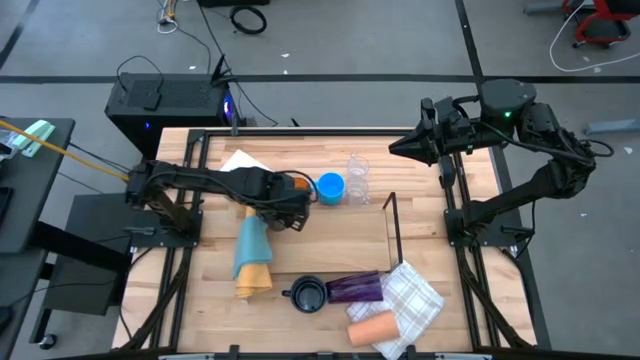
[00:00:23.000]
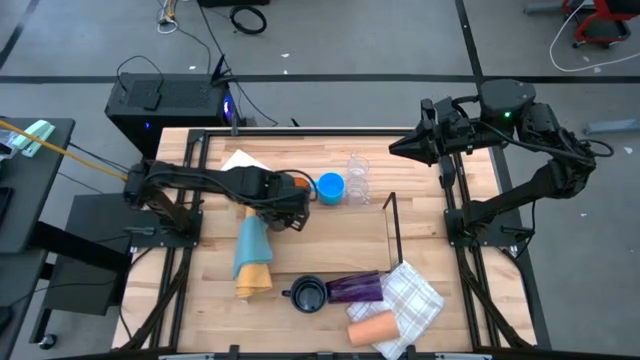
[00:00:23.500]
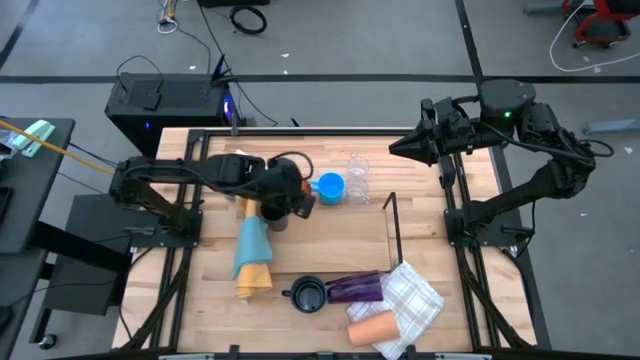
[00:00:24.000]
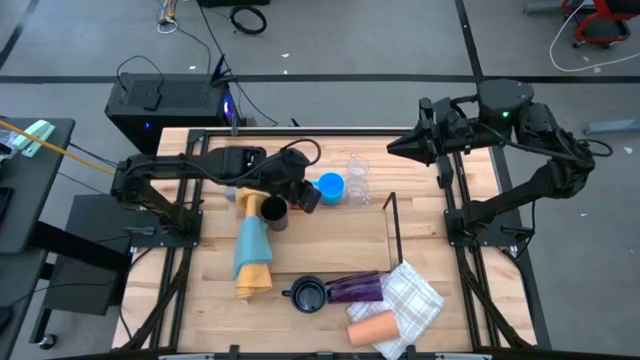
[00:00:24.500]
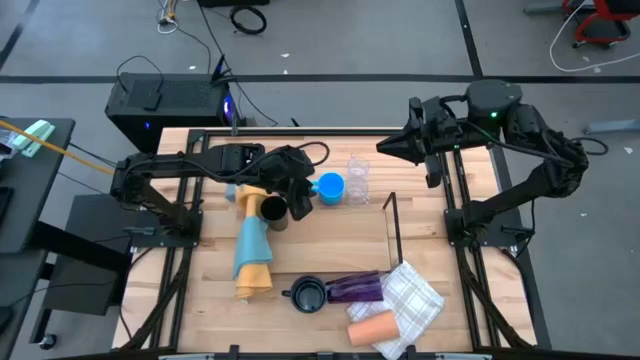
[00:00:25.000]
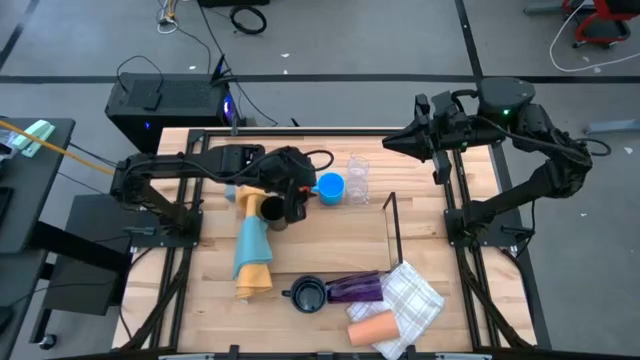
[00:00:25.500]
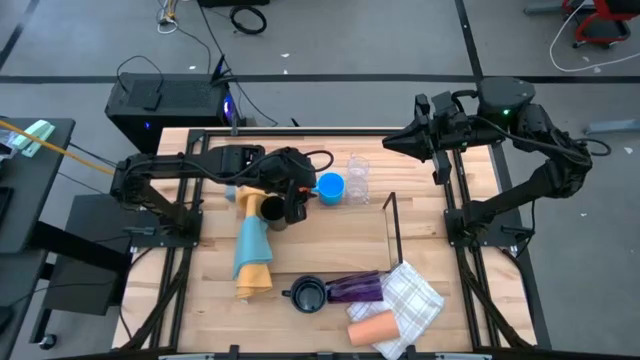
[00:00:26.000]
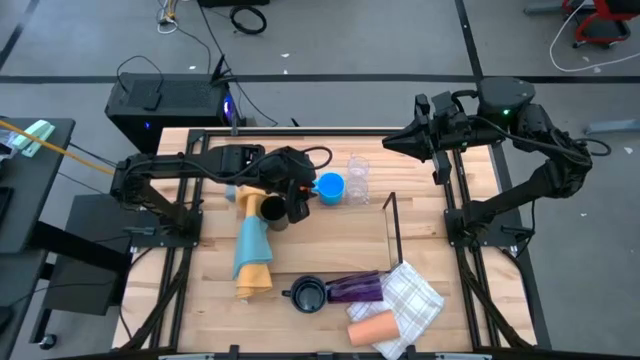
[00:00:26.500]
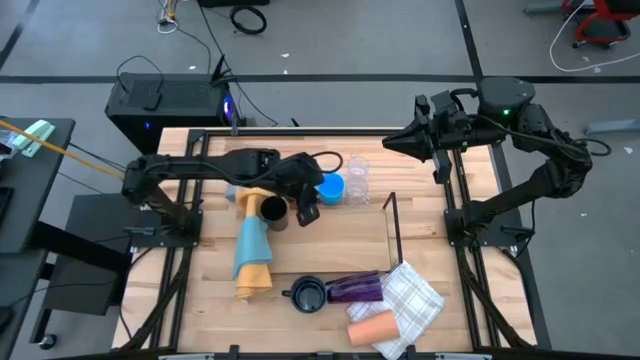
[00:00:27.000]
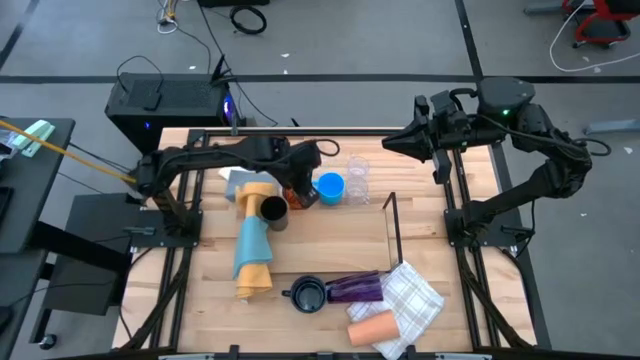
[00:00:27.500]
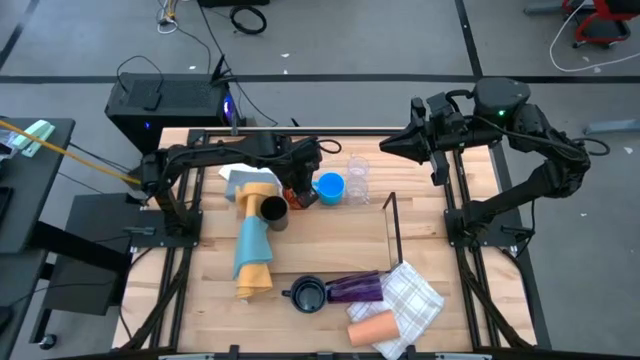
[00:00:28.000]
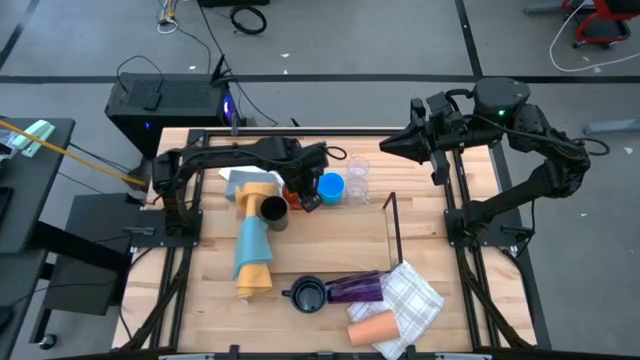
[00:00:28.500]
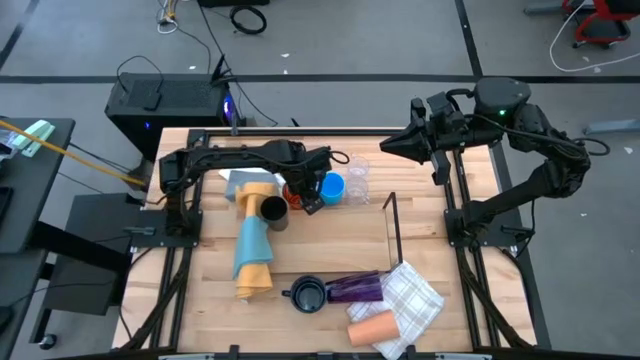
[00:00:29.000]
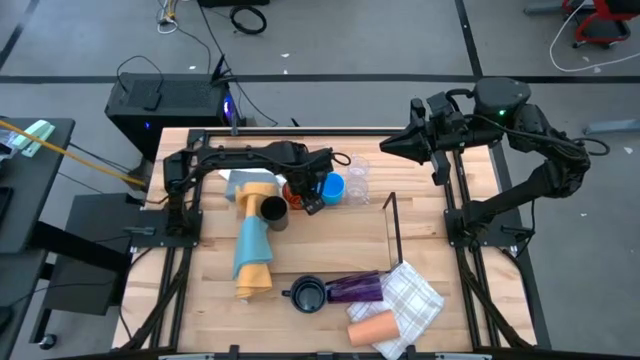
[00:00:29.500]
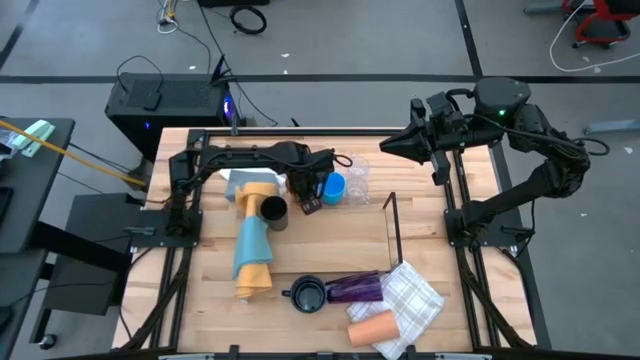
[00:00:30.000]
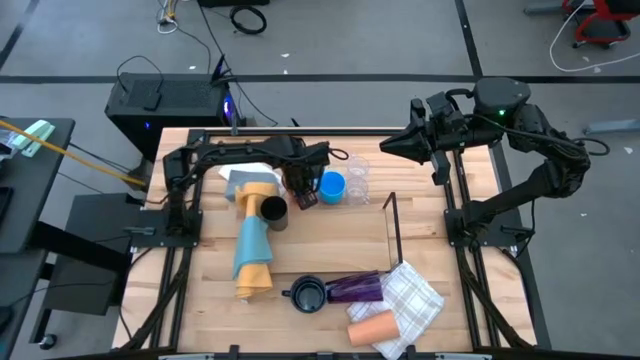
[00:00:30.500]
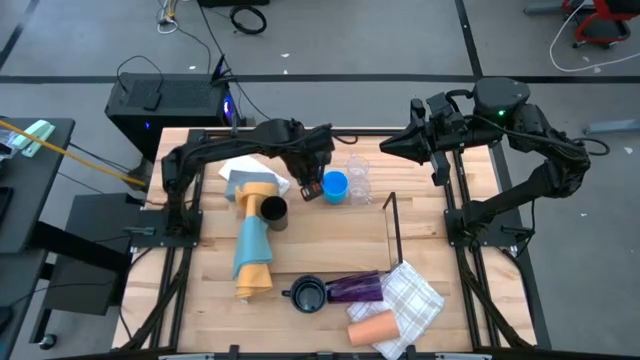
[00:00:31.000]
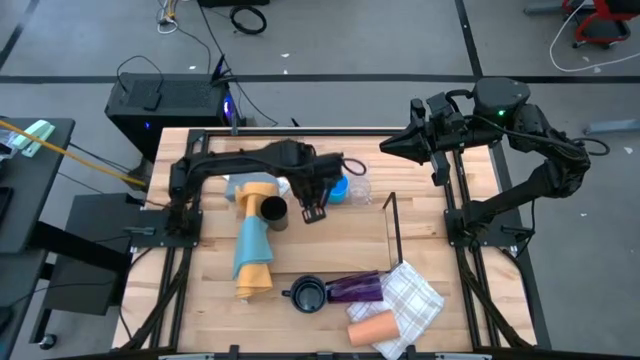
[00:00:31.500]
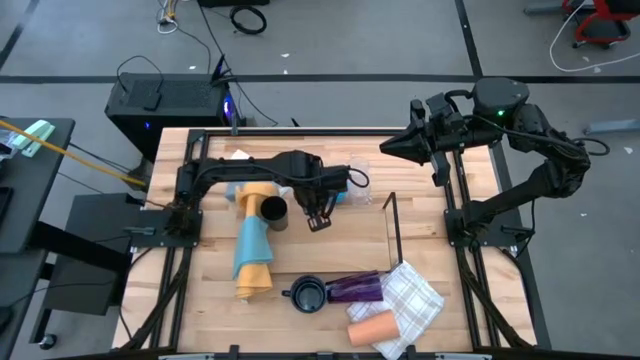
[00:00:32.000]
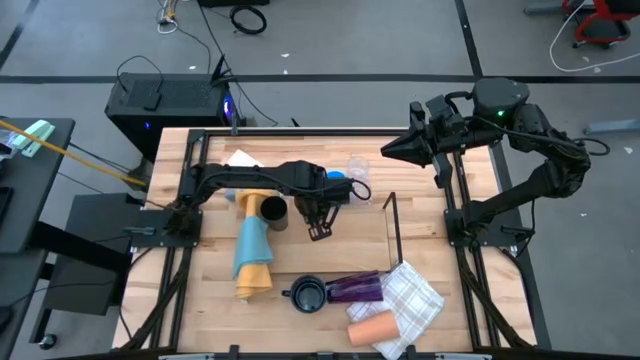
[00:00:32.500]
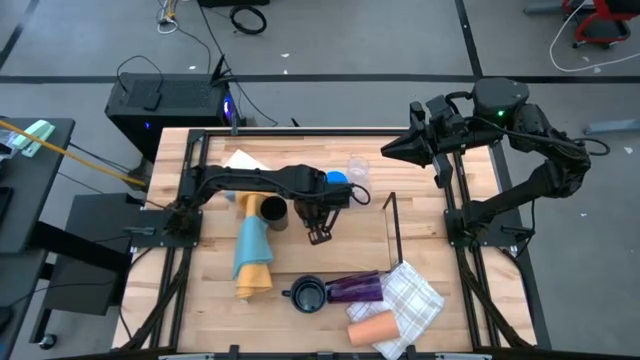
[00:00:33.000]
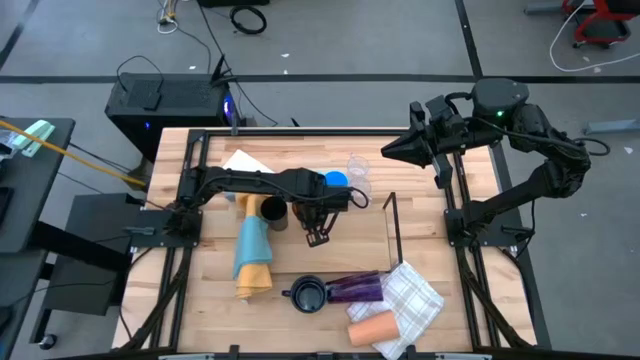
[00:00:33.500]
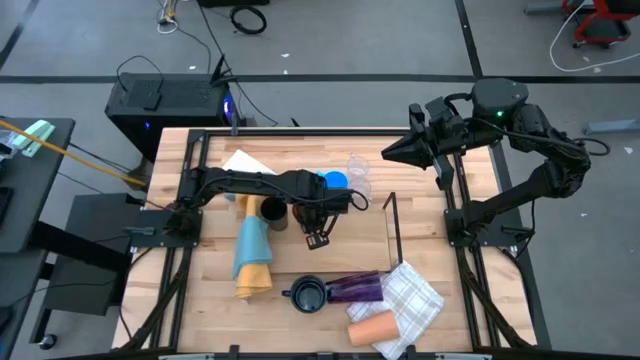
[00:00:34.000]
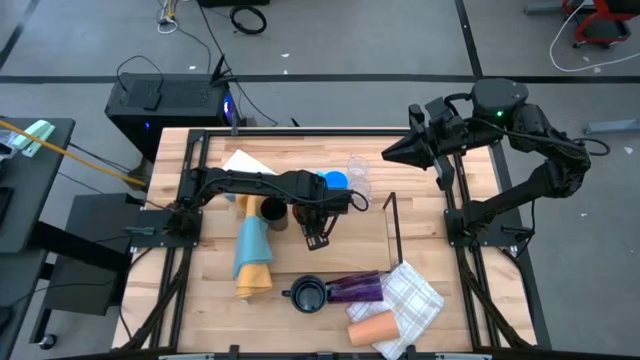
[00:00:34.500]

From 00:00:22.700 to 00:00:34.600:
Task: Stack small to large cups/mugs on shelf
Put the orange cup on the shelf

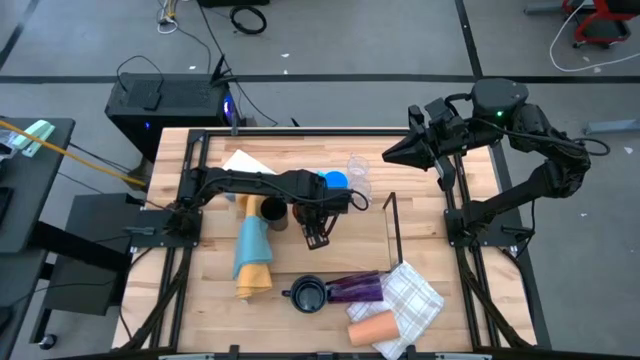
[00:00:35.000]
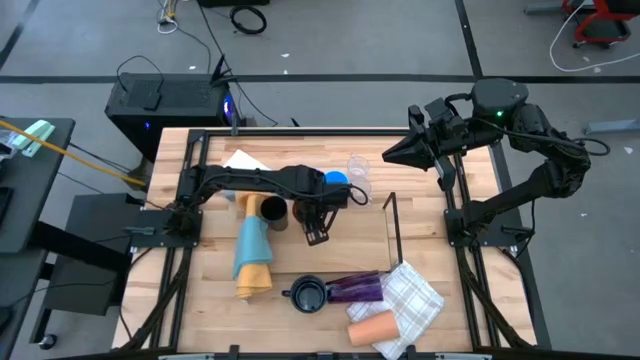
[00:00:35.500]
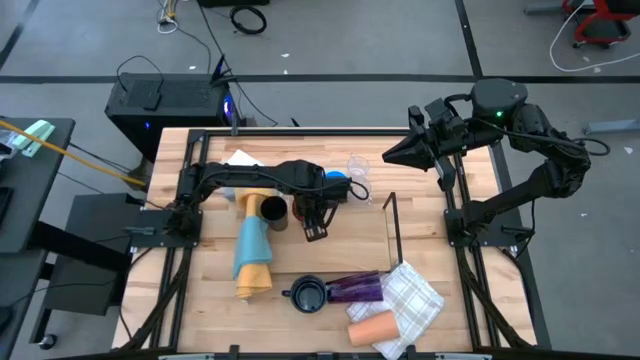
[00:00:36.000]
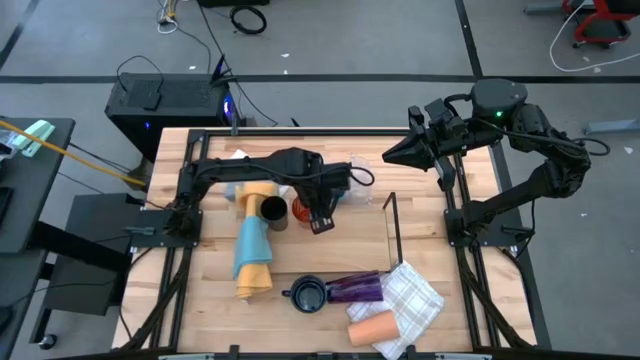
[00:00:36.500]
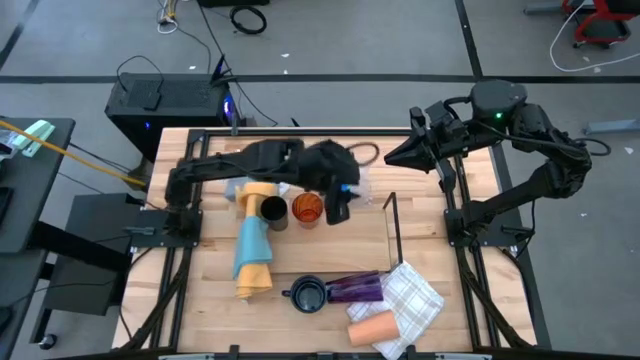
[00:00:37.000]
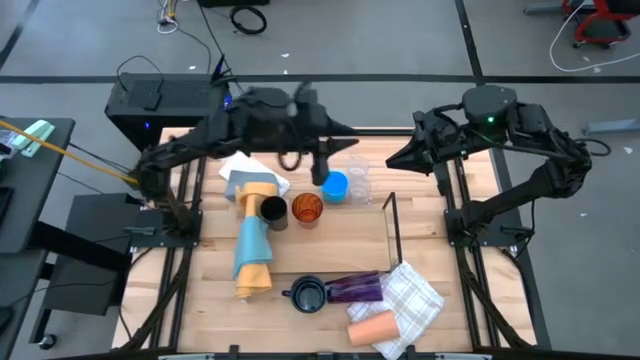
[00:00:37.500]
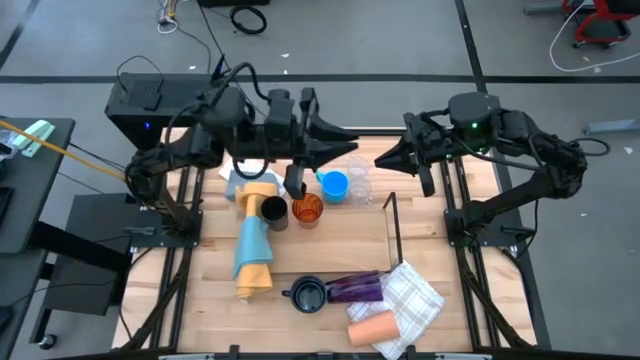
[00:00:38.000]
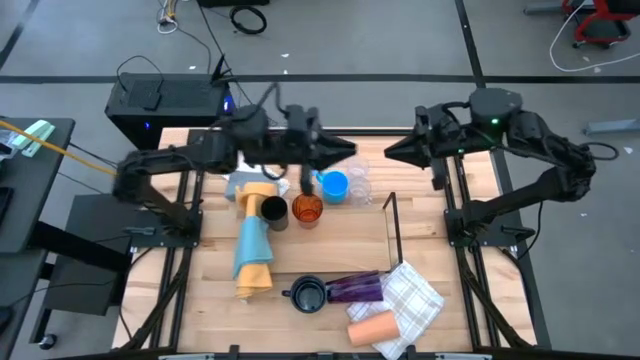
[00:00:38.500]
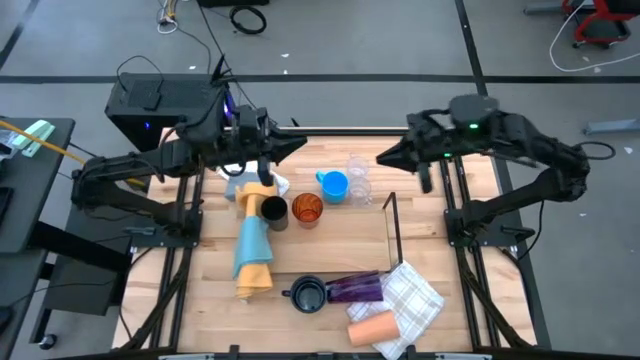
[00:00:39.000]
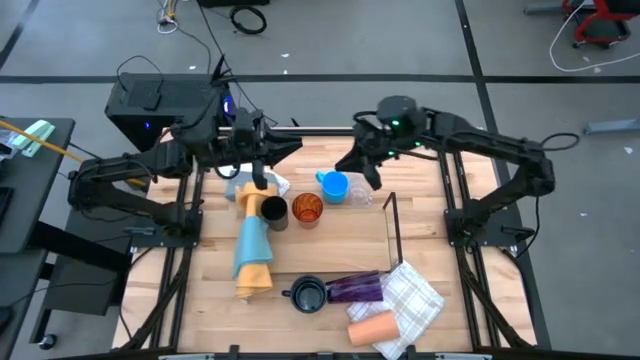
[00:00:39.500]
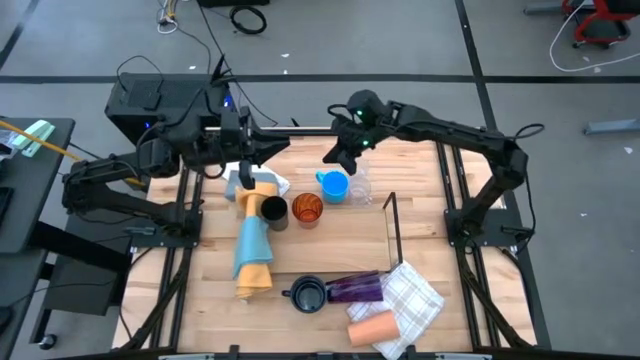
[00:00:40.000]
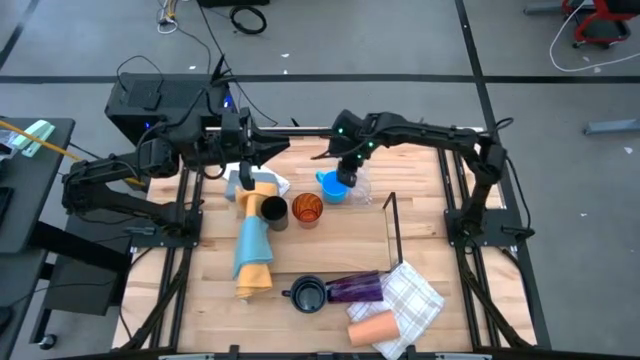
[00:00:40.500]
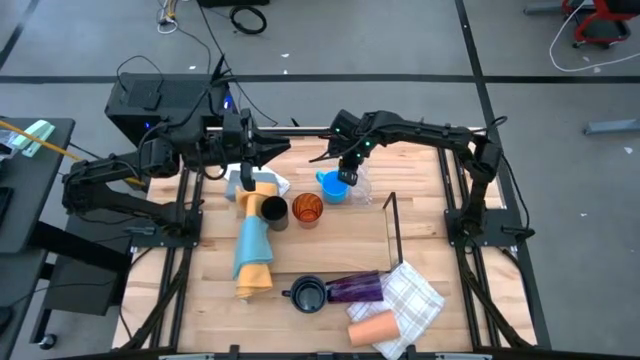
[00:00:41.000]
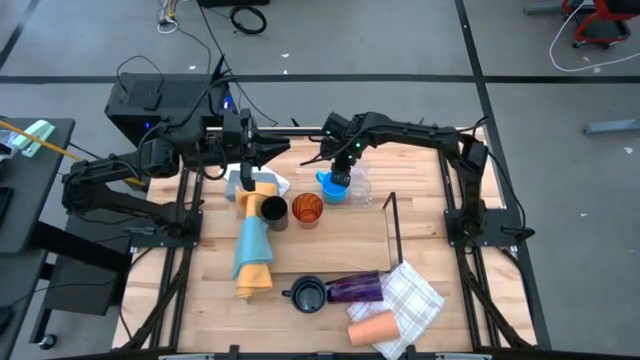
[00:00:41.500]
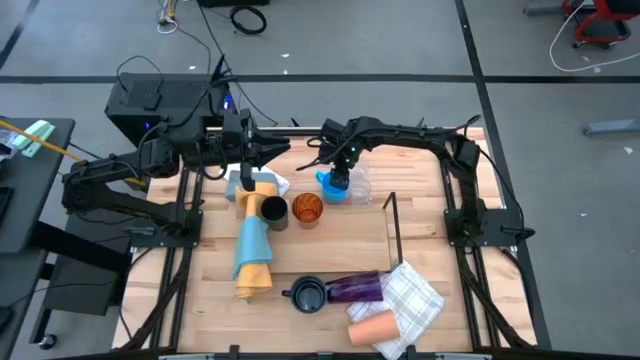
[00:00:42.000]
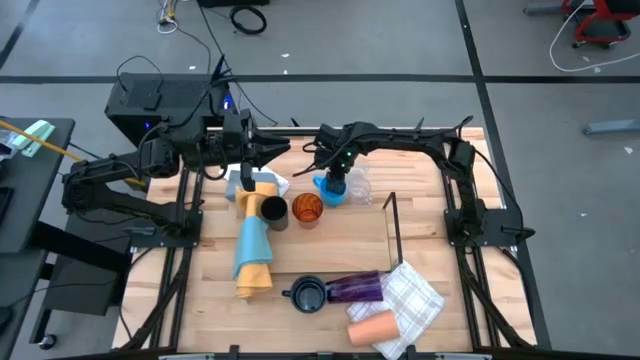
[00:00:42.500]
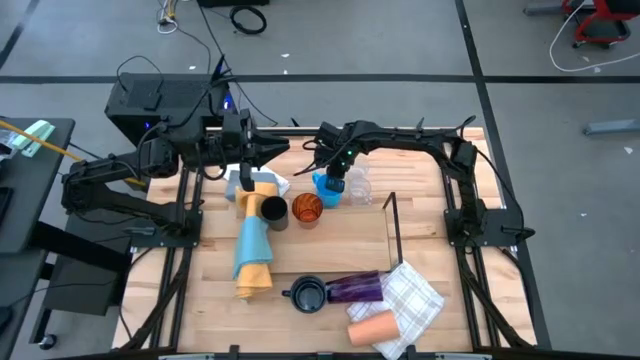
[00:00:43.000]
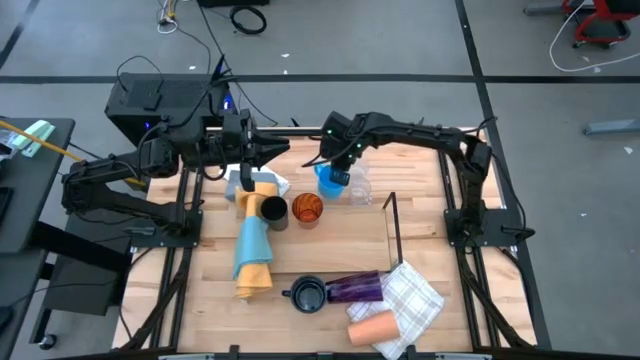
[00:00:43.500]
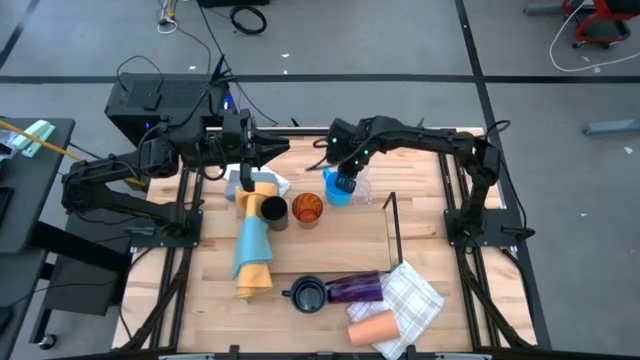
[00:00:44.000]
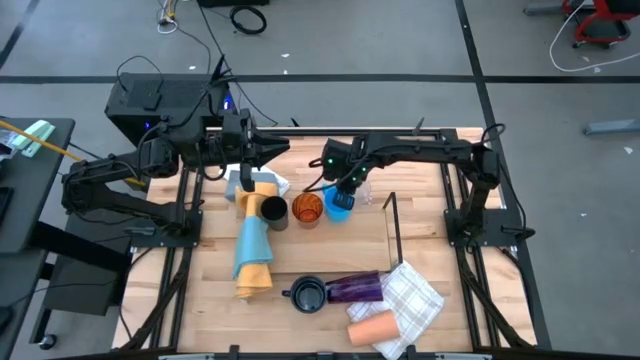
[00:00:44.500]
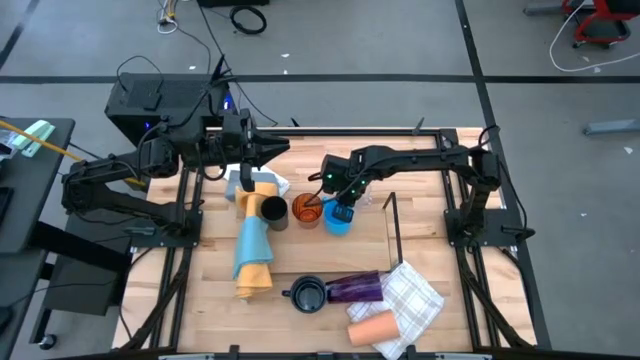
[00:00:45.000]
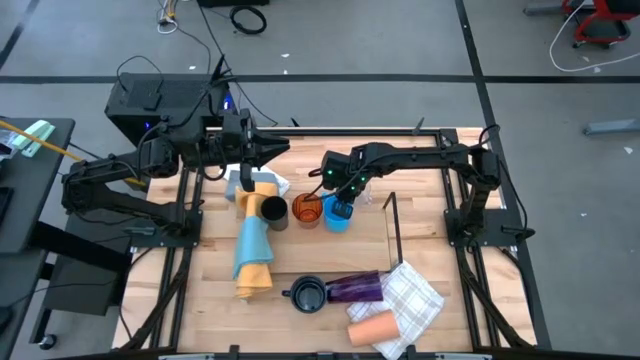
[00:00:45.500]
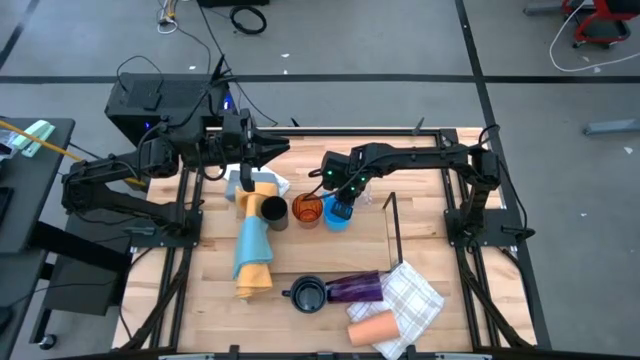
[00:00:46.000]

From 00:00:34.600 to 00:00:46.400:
Put the blue mug on the shelf
